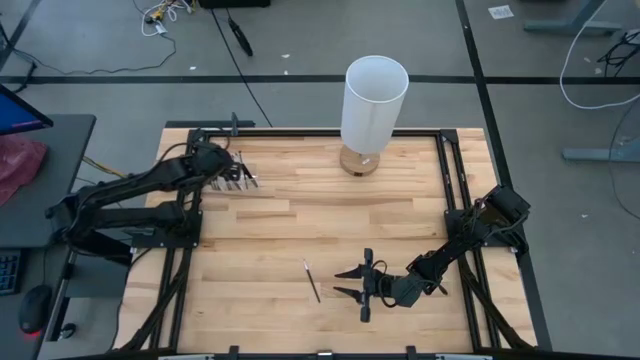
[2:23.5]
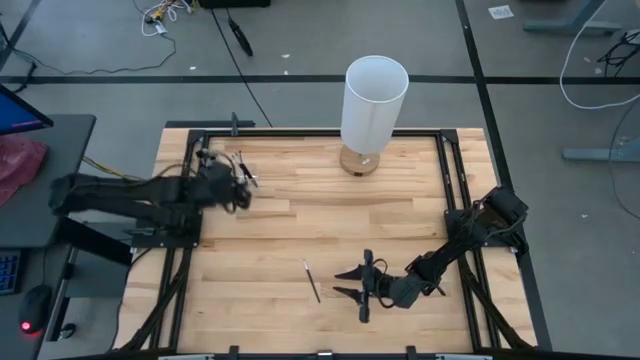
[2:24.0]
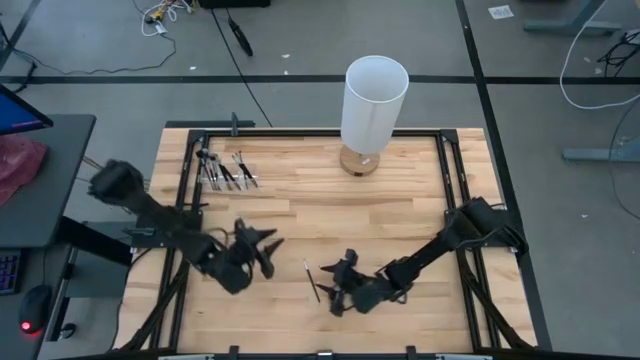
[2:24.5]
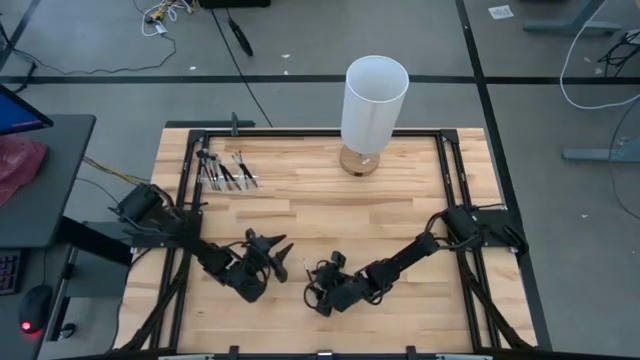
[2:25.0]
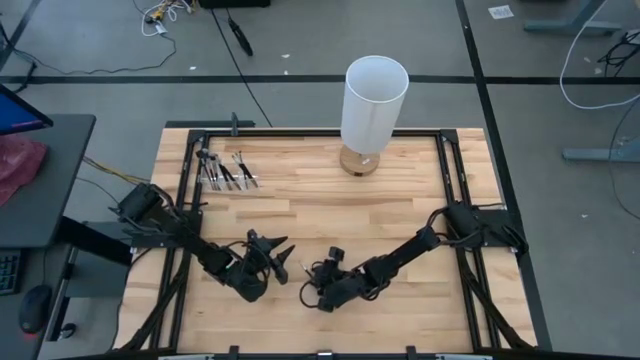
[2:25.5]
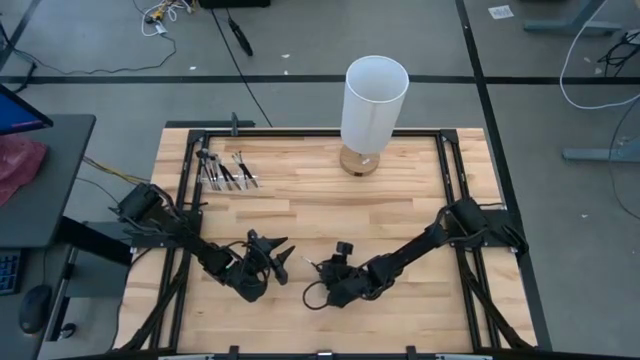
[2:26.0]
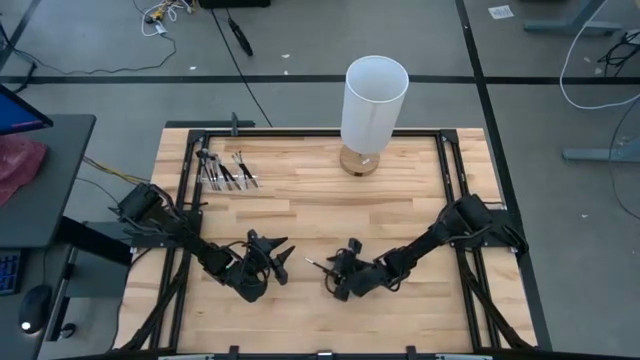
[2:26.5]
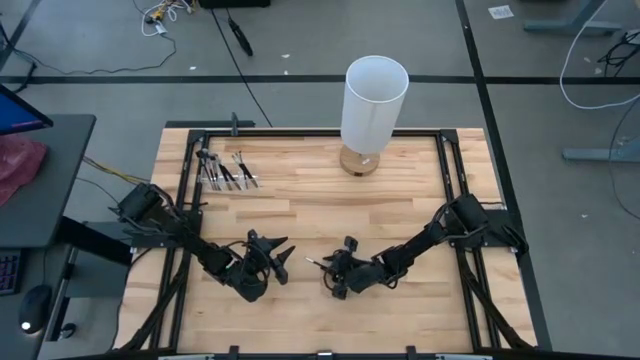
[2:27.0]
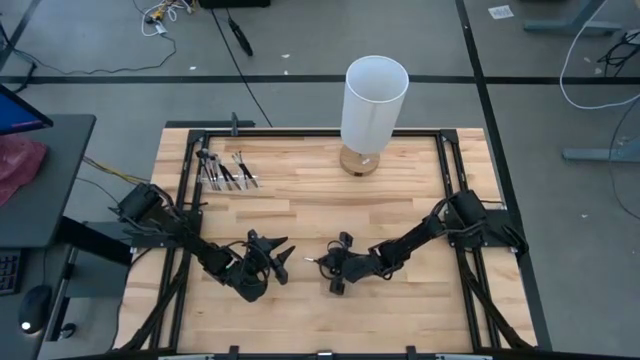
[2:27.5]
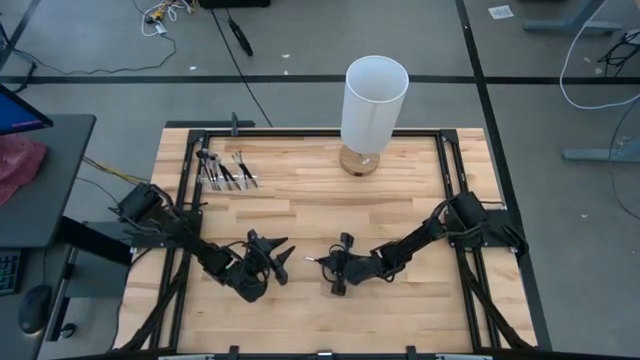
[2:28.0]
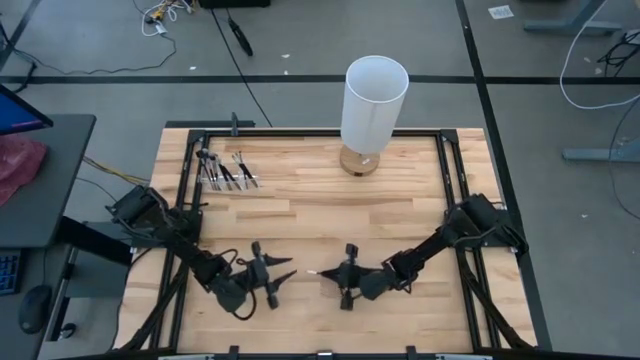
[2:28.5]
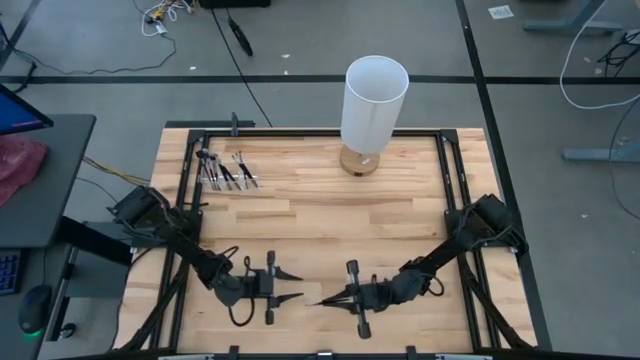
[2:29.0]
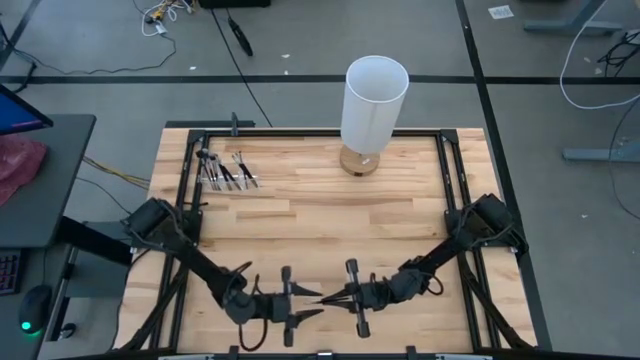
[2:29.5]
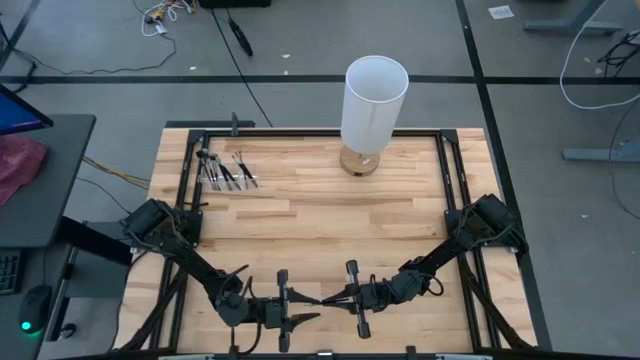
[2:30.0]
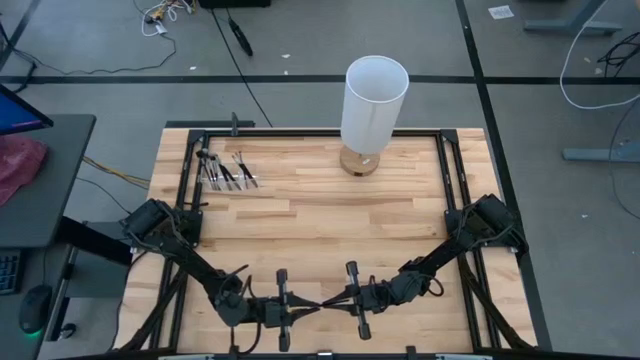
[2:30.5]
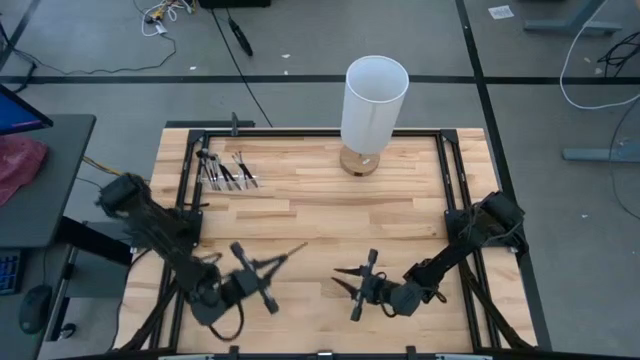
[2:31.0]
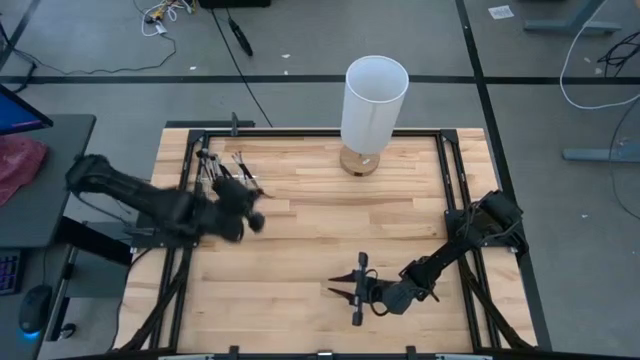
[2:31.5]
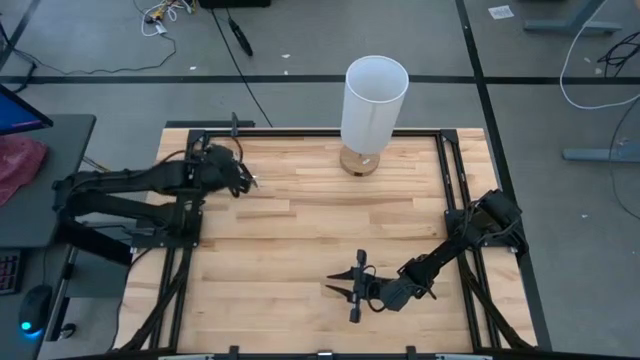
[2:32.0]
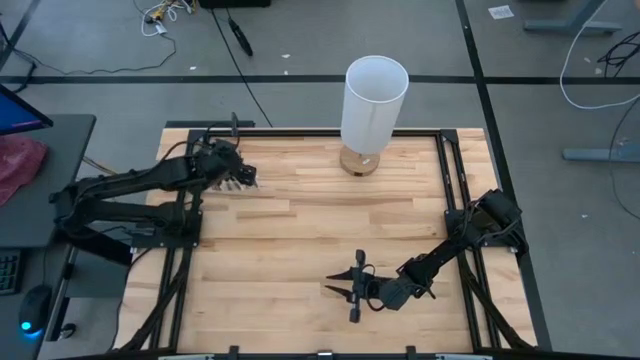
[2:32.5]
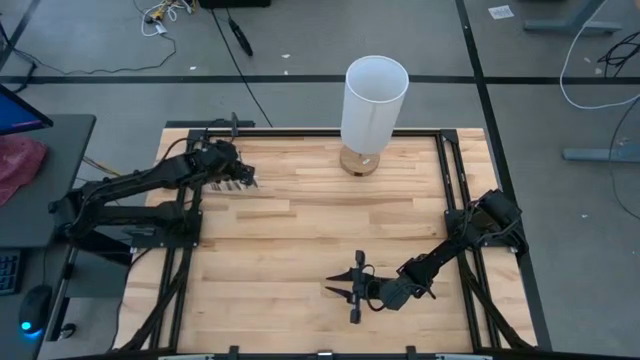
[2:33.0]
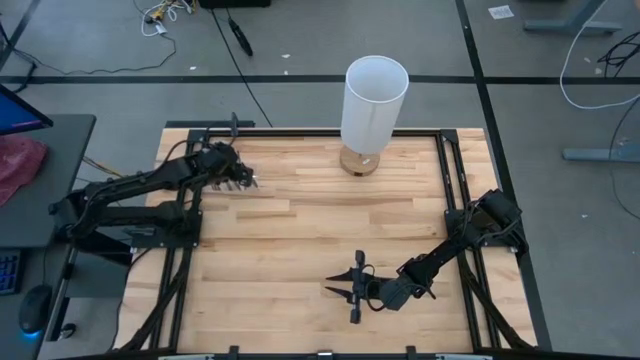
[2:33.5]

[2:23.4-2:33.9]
Task: Put items in baskets/containers
Put the black liner brush into the transparent organizer

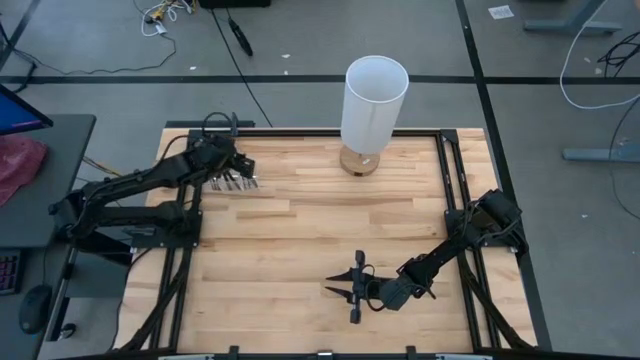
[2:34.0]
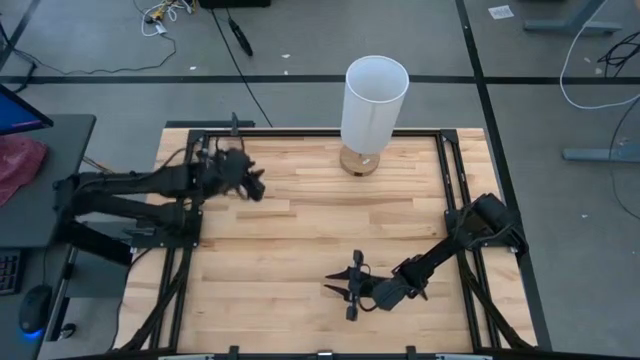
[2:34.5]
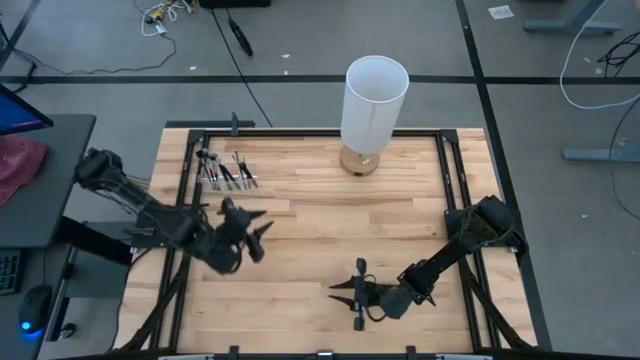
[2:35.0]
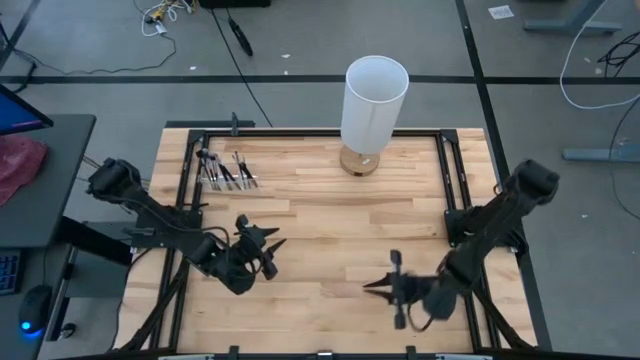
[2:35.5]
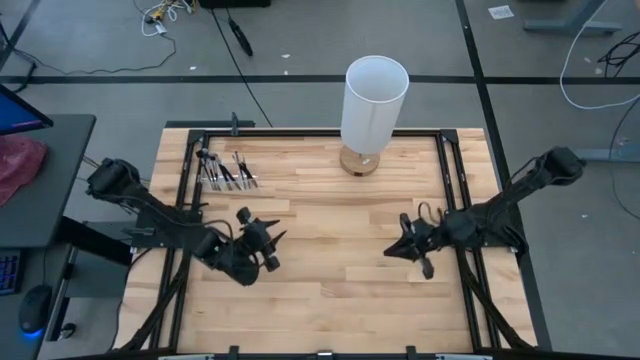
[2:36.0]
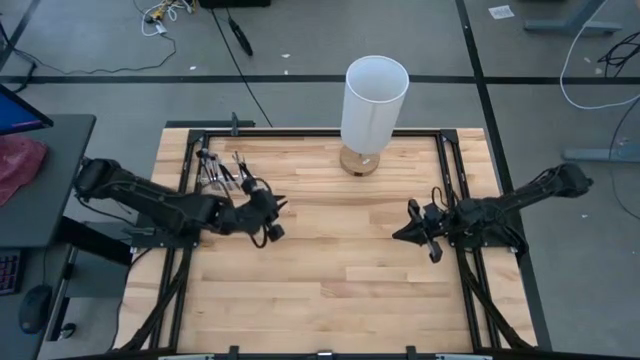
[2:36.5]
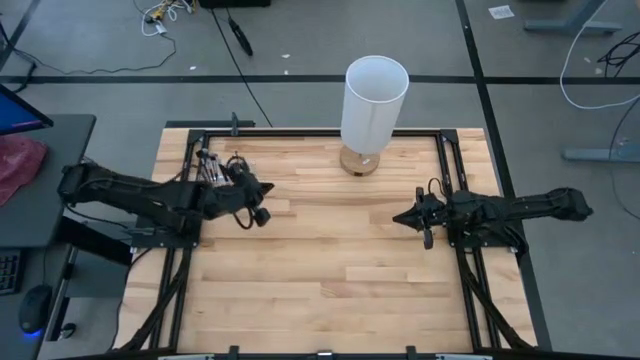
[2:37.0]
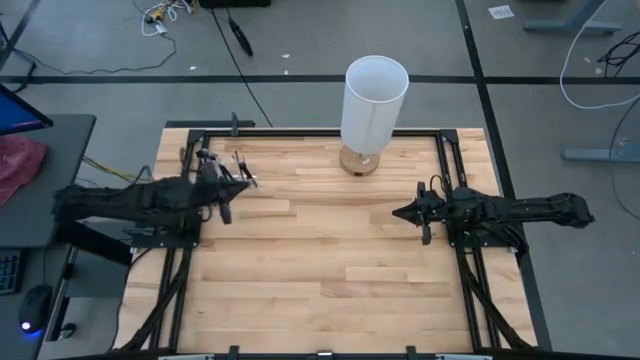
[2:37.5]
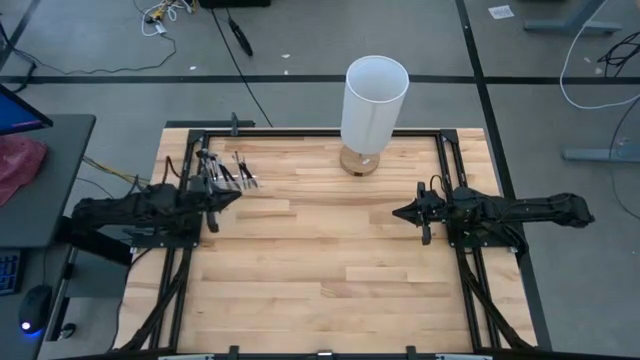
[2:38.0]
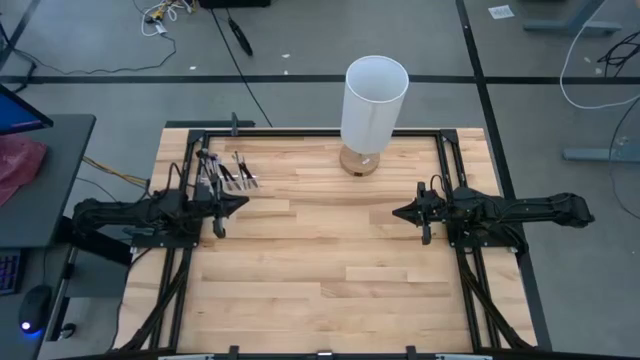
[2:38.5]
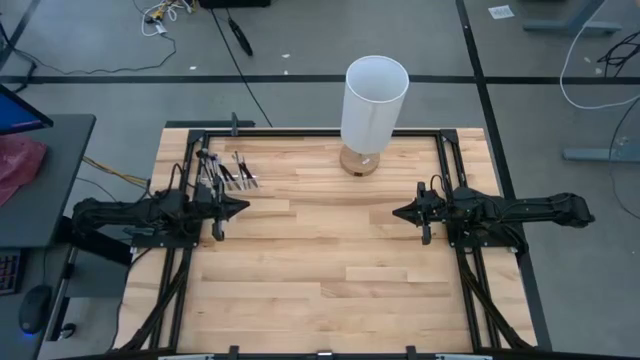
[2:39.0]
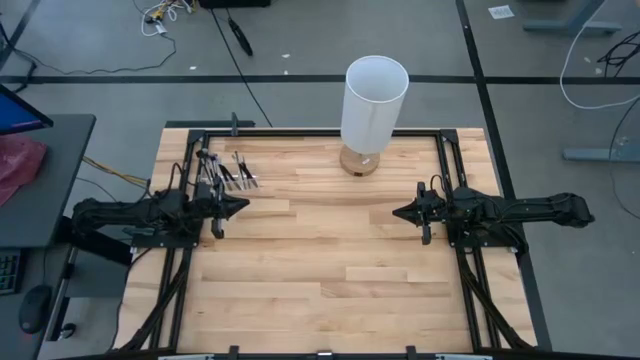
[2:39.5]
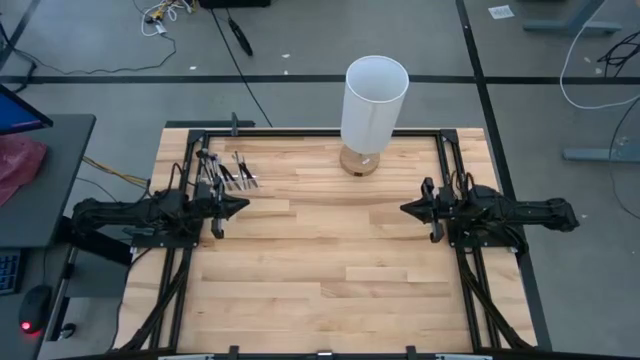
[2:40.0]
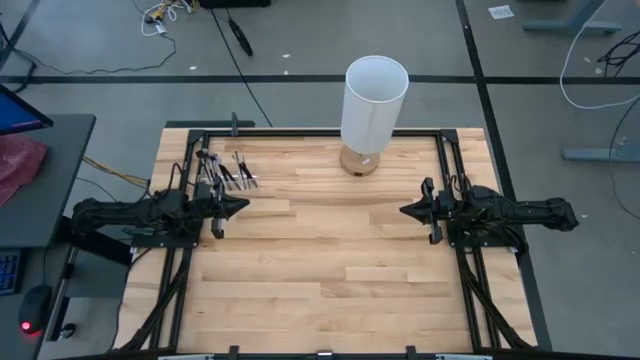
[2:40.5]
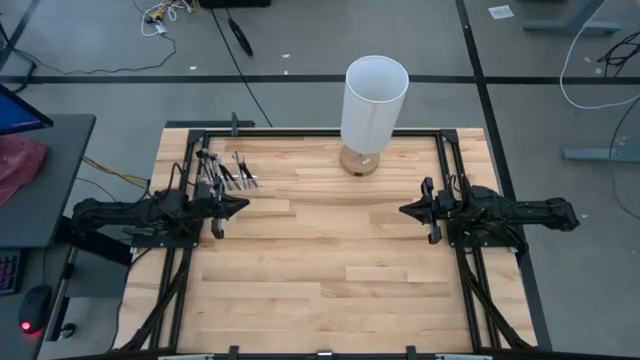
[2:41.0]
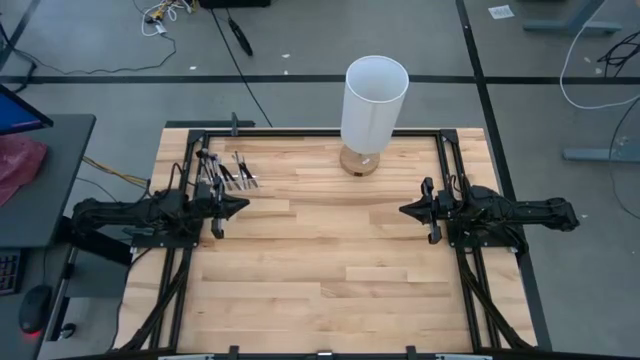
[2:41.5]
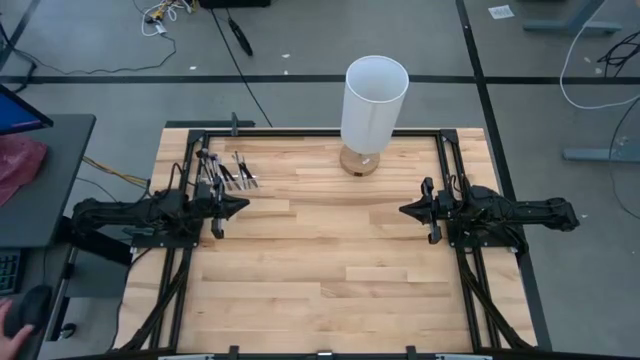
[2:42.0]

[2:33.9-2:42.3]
Return to Home Position

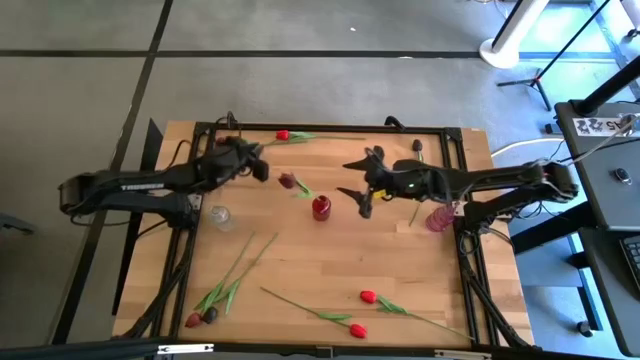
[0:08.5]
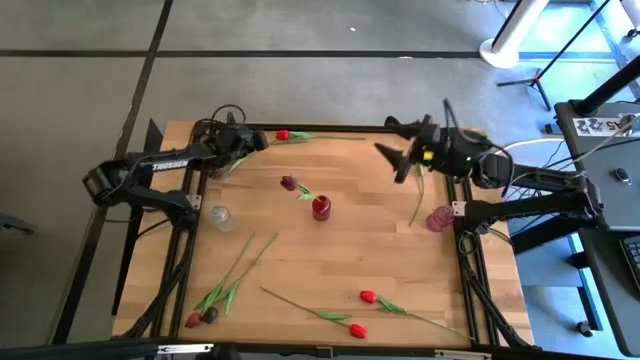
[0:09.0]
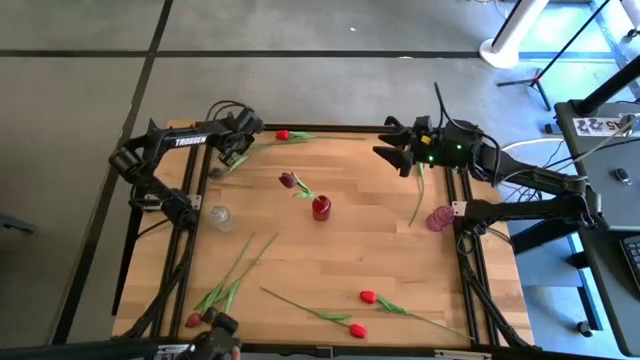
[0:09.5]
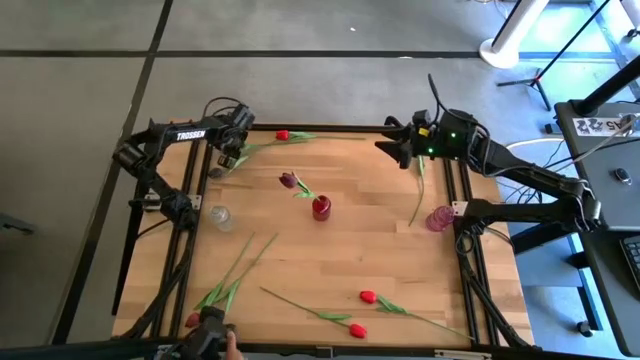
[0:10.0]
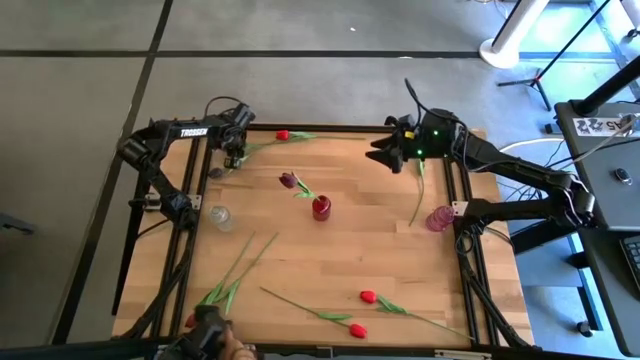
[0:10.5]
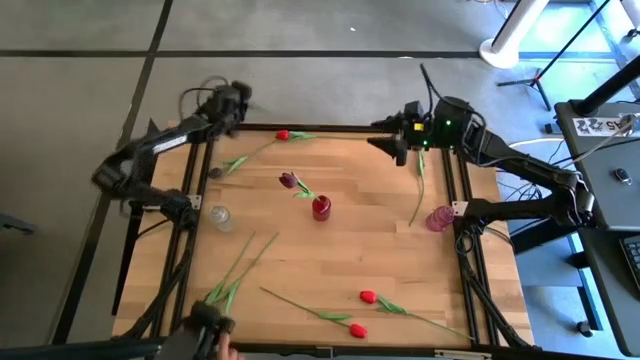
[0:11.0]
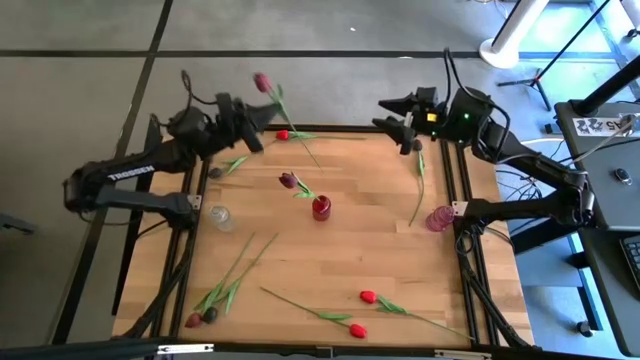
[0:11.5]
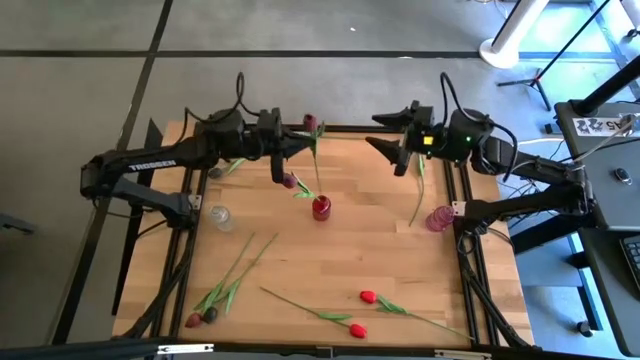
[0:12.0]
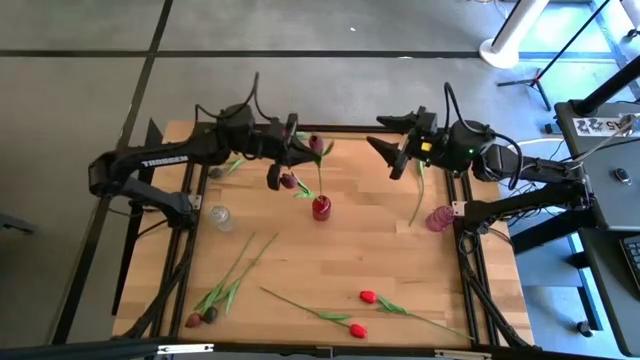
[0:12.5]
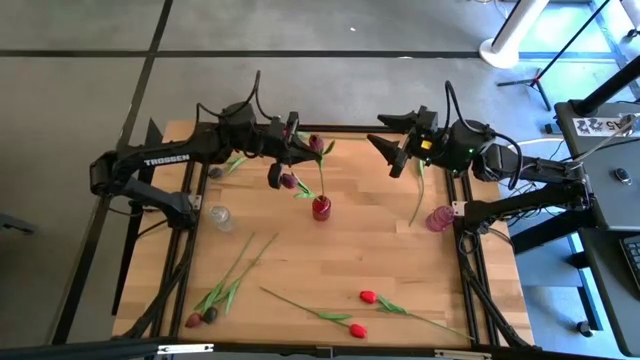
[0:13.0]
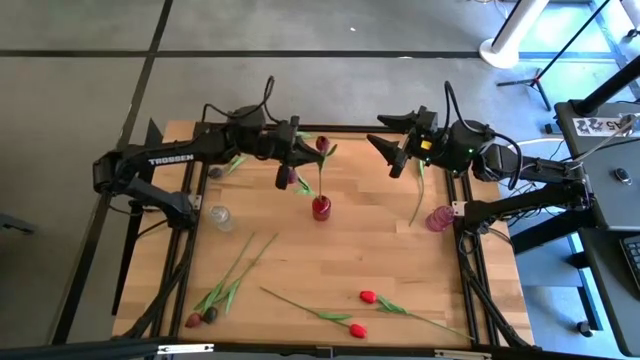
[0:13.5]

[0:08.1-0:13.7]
Task: Sort flowers into vase by color
Put the top dark red tulip into the red vase
